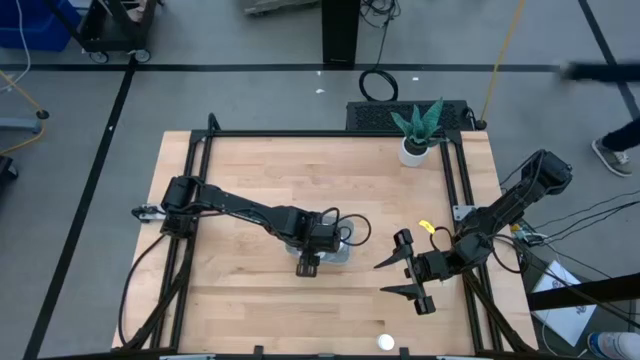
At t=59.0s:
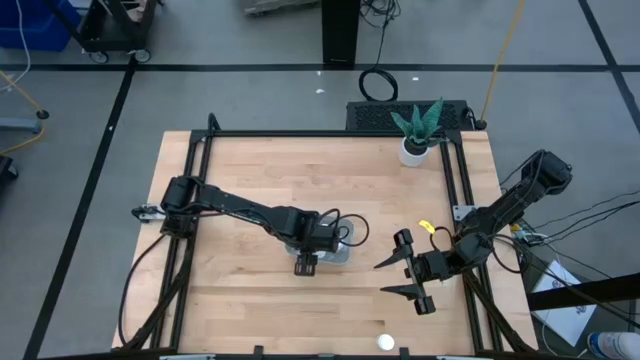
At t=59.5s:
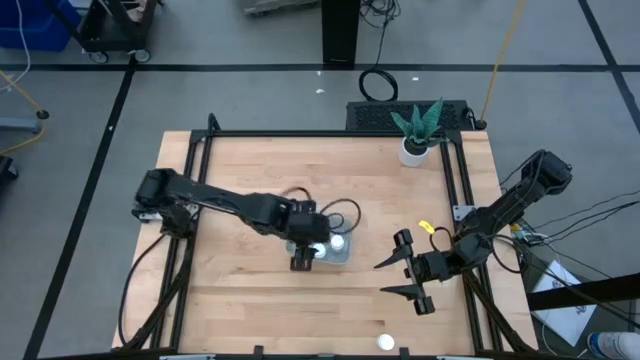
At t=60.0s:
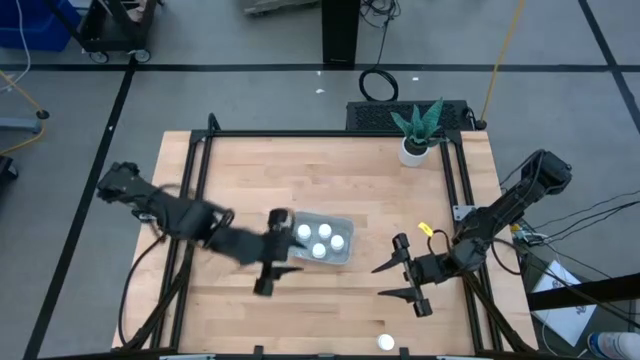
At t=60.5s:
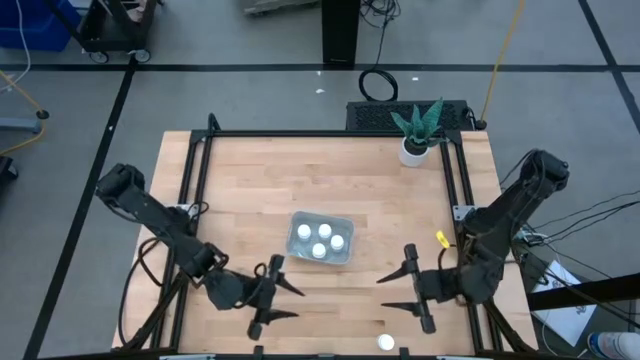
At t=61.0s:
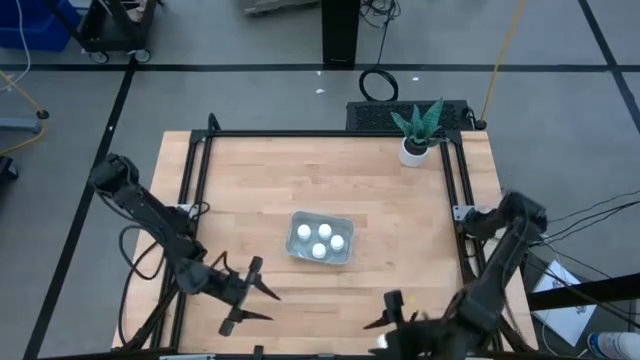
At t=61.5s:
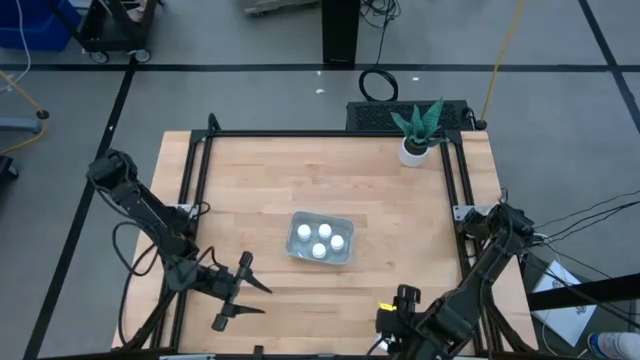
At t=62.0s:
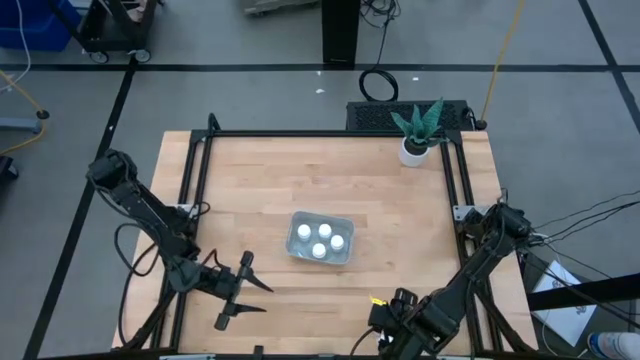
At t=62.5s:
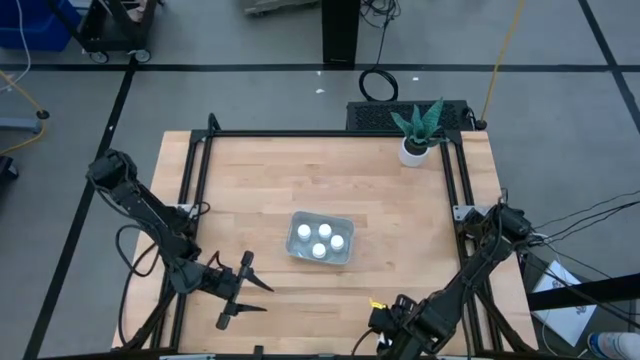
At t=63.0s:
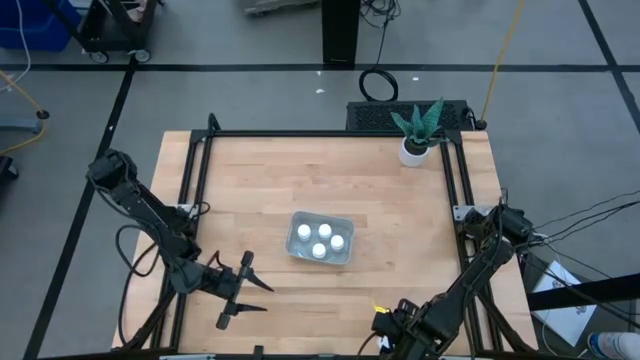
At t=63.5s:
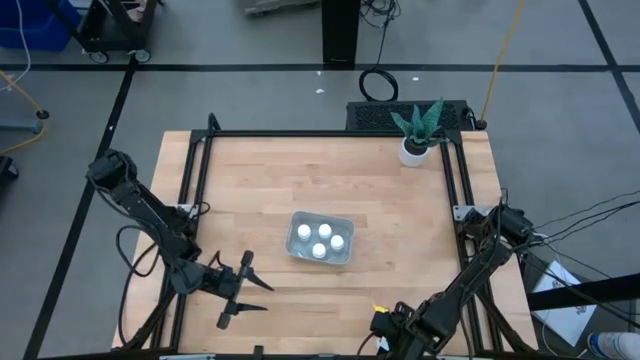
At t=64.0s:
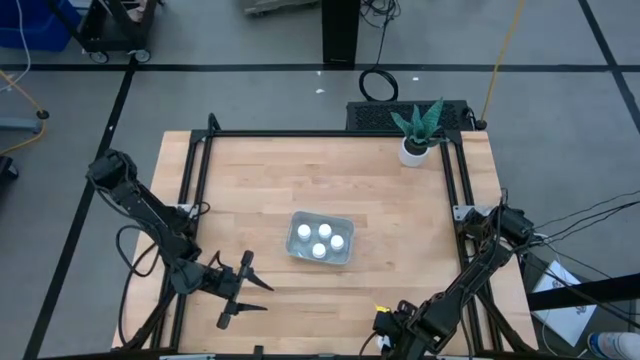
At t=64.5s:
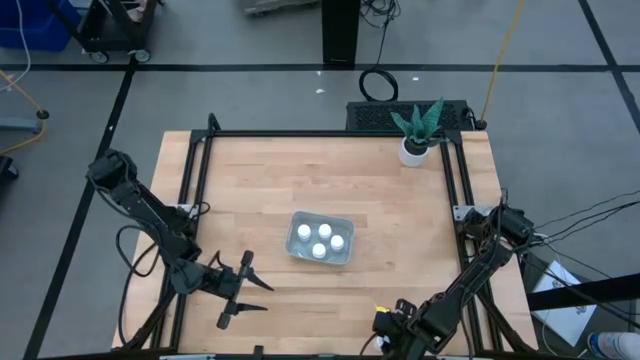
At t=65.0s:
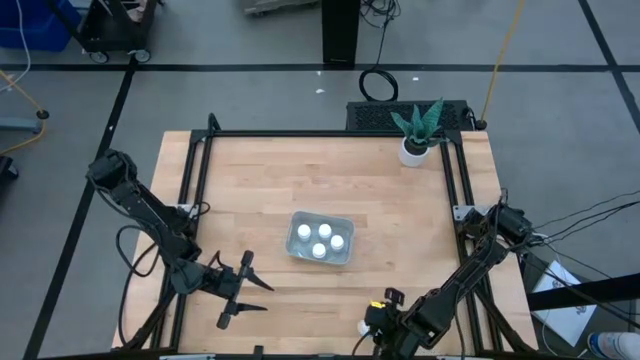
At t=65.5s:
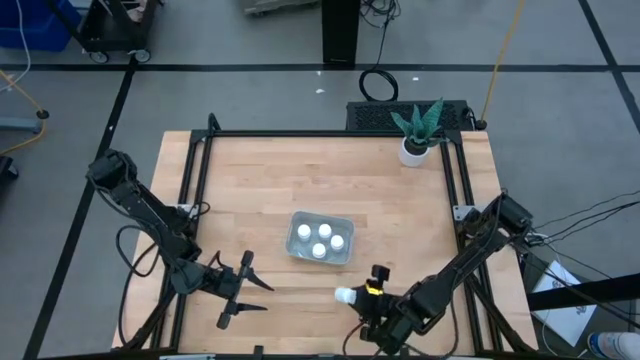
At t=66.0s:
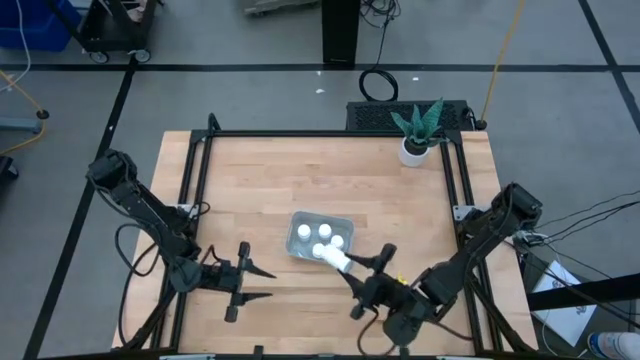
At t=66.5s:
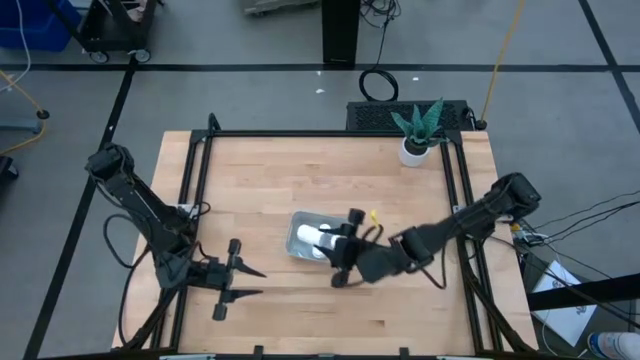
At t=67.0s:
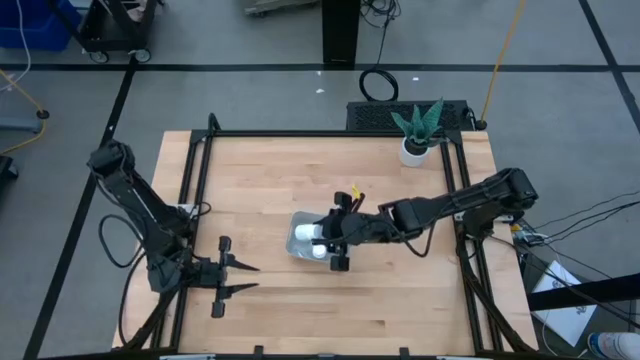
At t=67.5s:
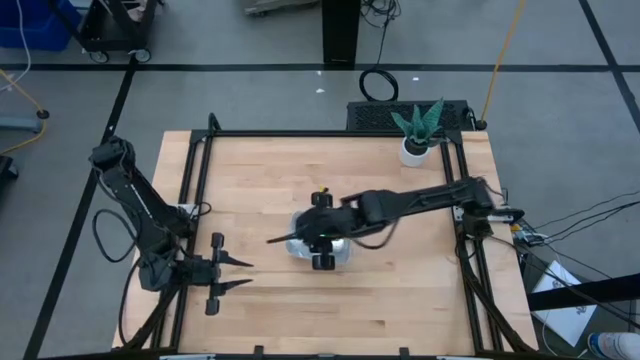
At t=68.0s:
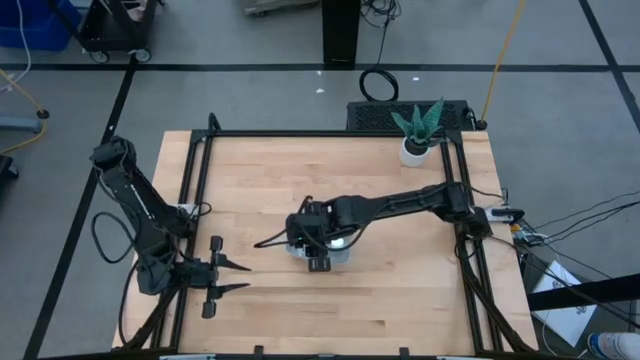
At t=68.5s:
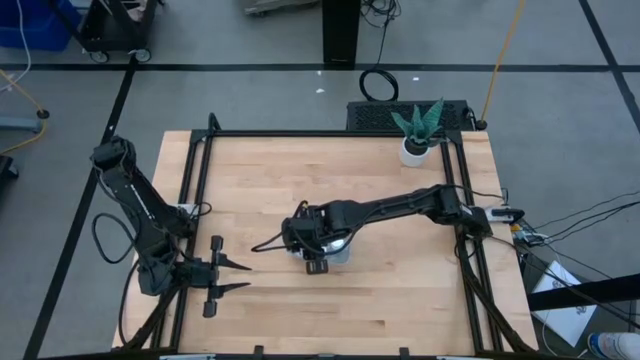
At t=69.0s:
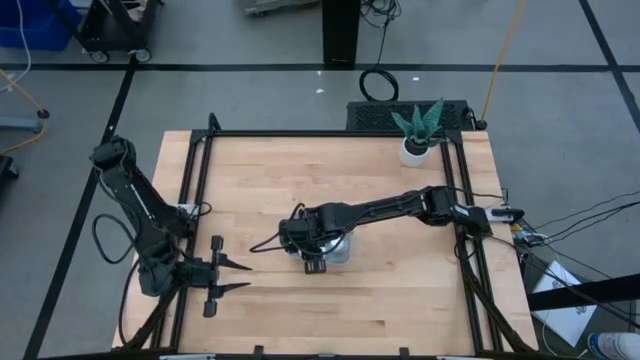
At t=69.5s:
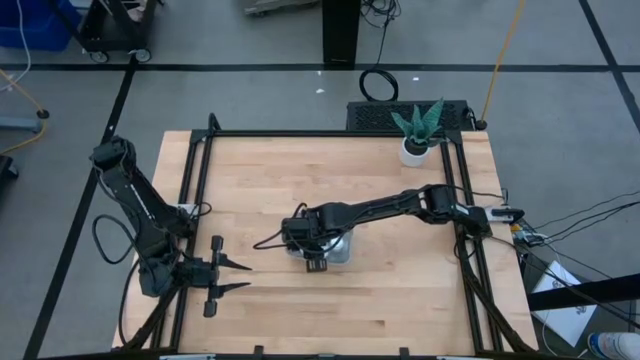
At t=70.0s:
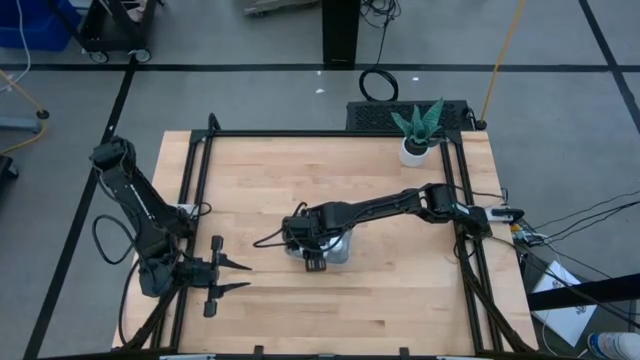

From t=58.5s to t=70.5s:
Task: Pick and place pill bottles into a basket
Put the pill bottle into the bin

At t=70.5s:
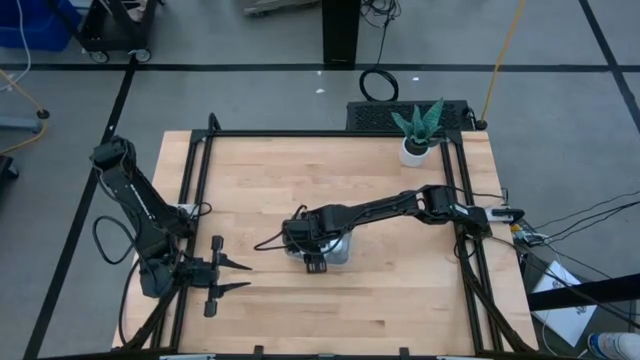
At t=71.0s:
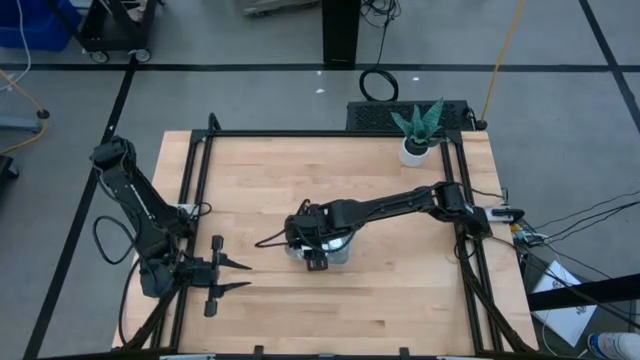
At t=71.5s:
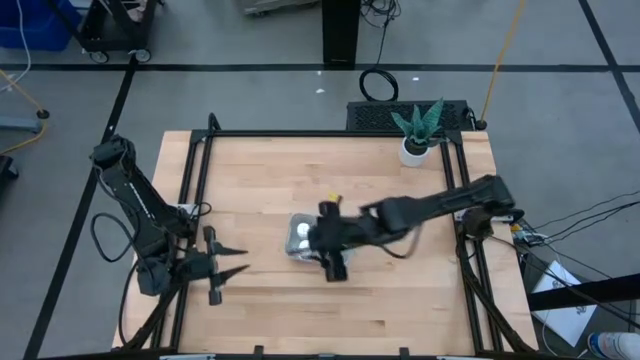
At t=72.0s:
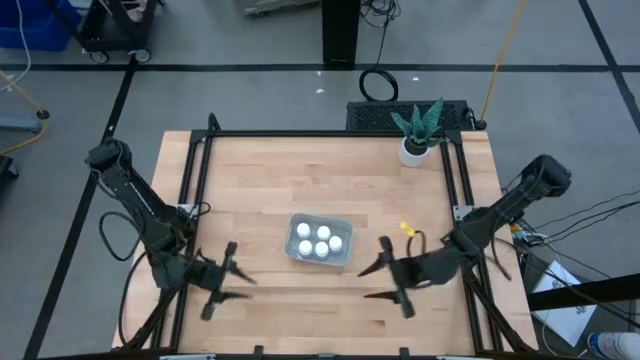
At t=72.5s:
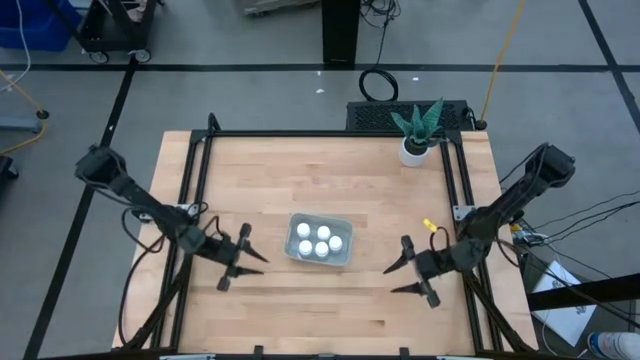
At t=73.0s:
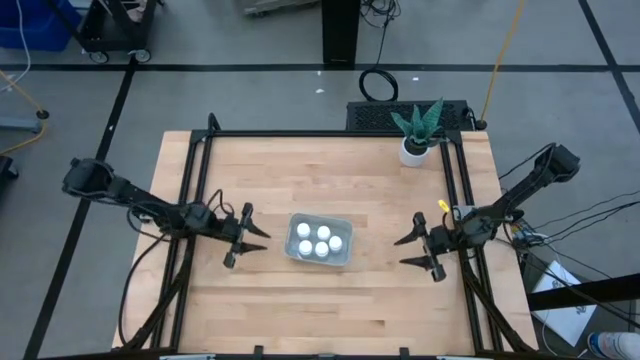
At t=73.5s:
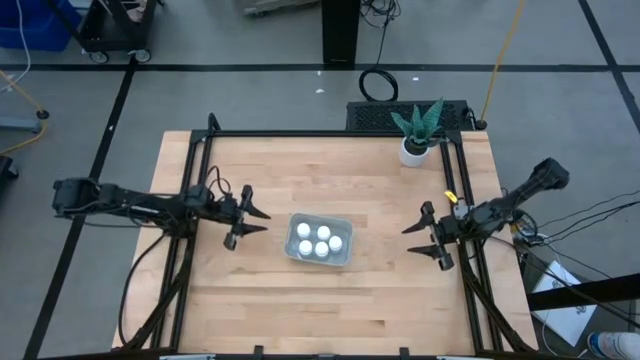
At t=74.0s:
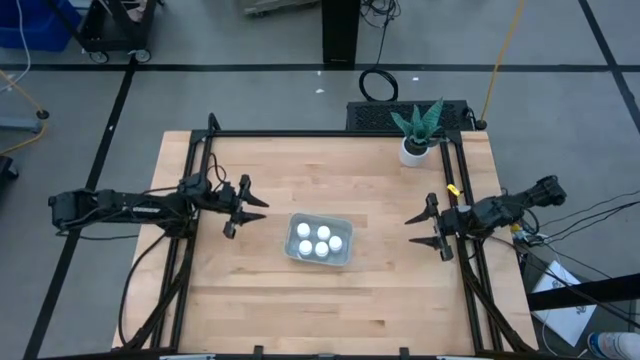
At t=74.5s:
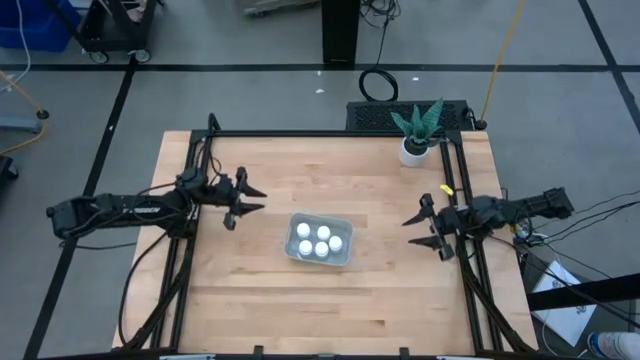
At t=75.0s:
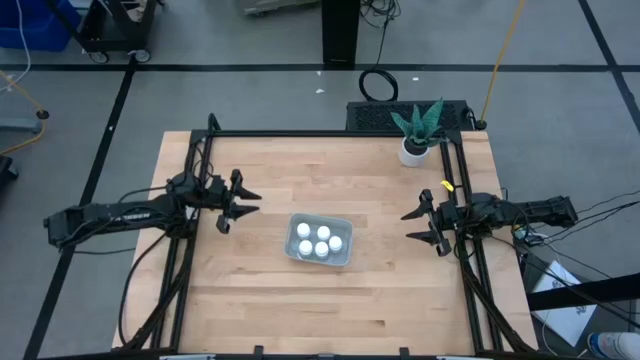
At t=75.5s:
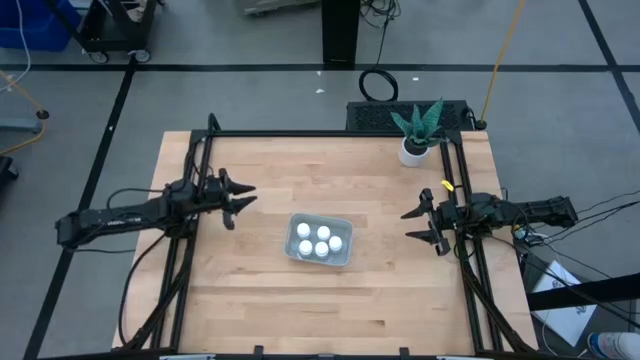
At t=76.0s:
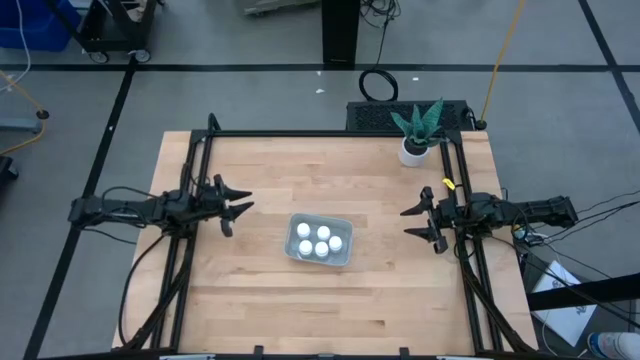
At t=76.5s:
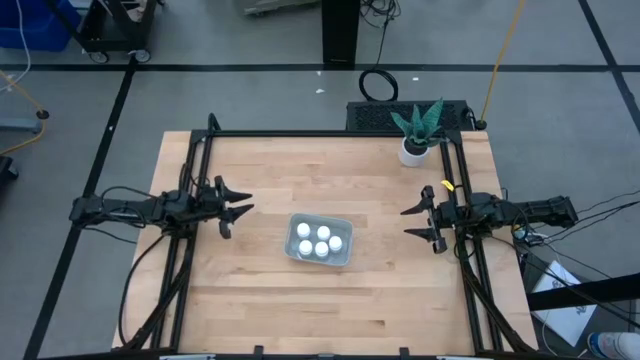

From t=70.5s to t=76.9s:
Return to Home Position

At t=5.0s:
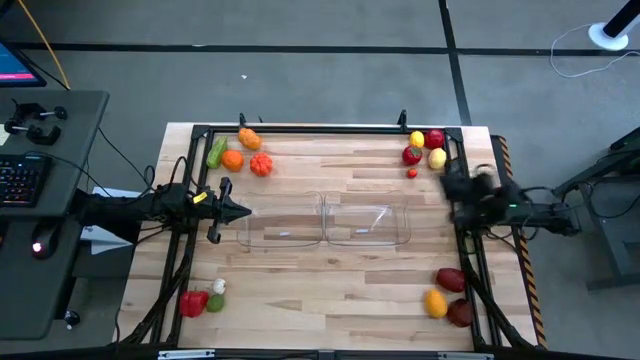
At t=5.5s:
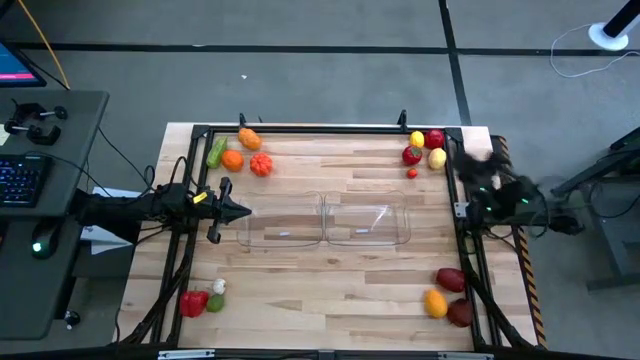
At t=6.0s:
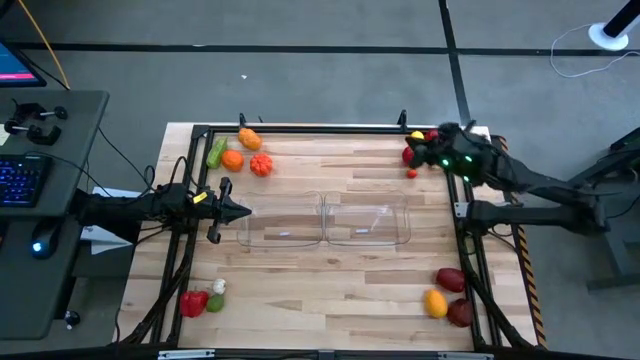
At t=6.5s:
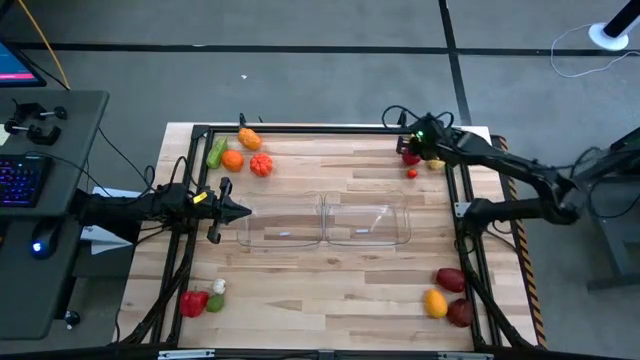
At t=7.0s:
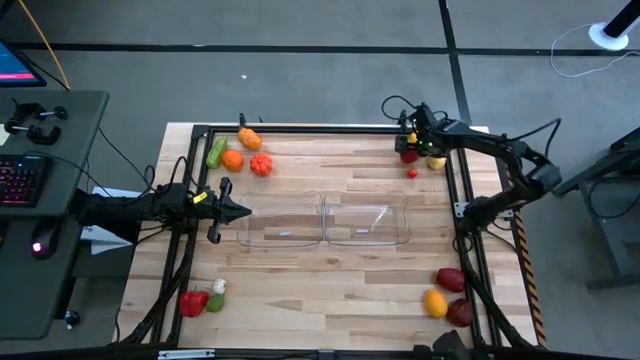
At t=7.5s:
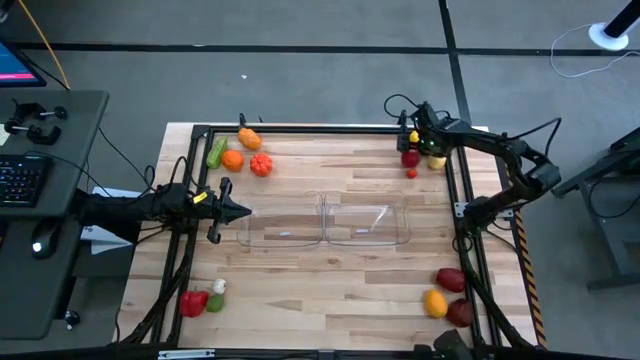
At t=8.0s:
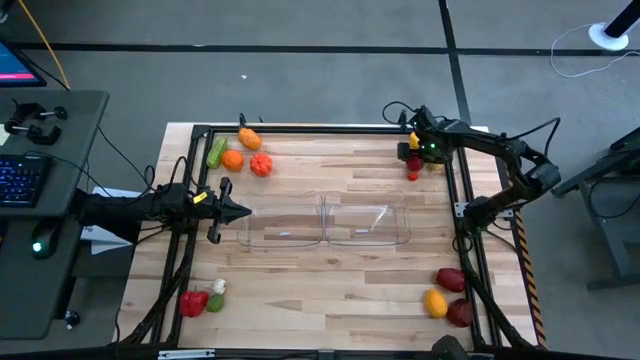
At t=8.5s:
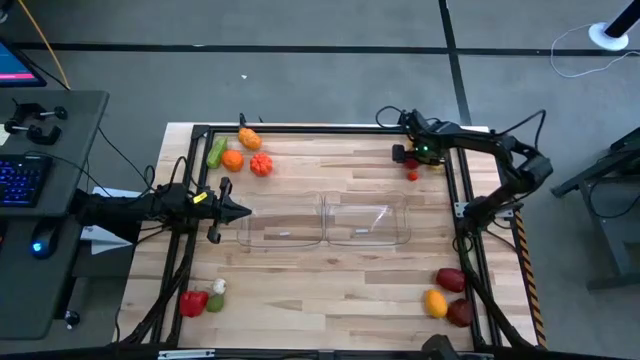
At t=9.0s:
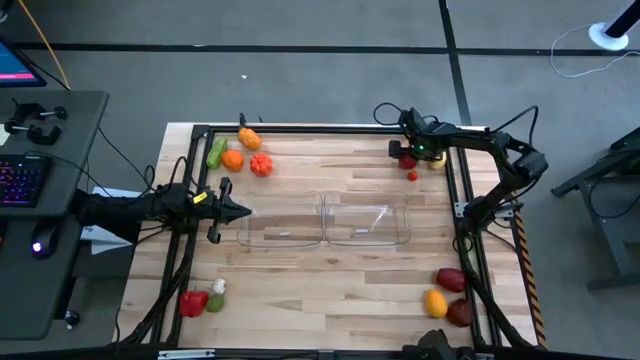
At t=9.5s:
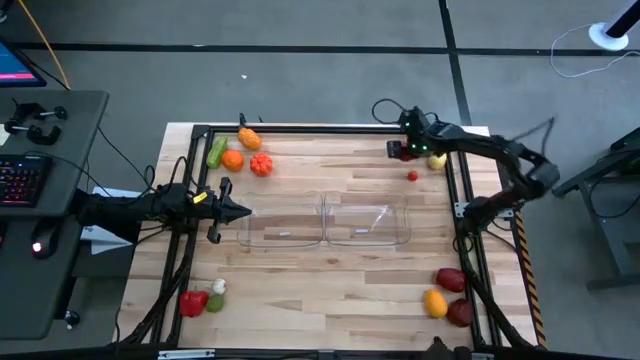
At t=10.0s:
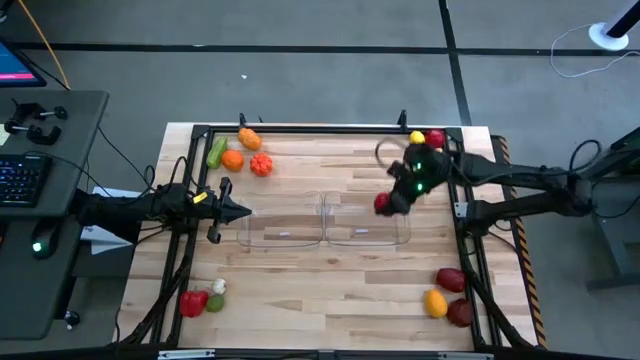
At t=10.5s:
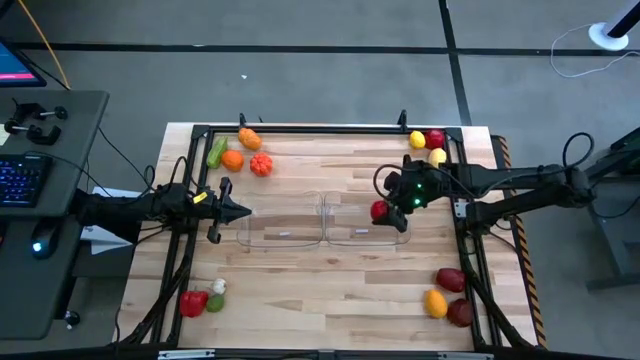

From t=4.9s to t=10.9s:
Task: Sort produce into baskets
Put the left red tomato into the right transparent bin
